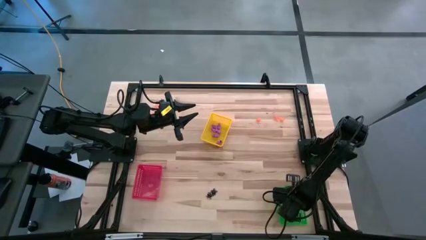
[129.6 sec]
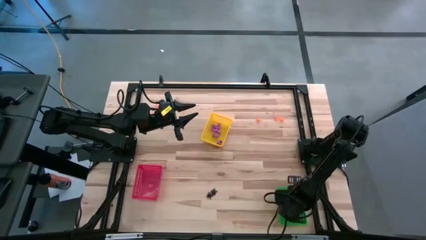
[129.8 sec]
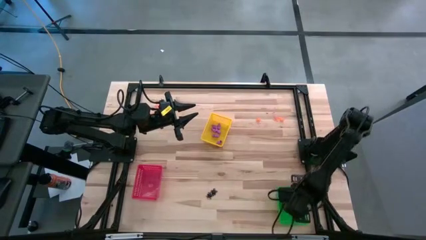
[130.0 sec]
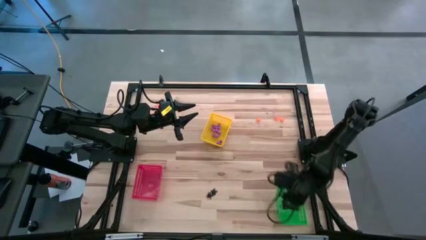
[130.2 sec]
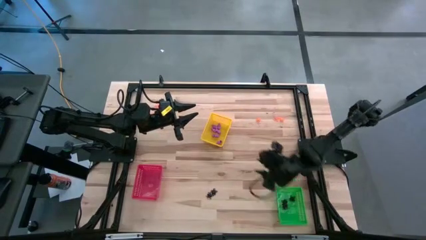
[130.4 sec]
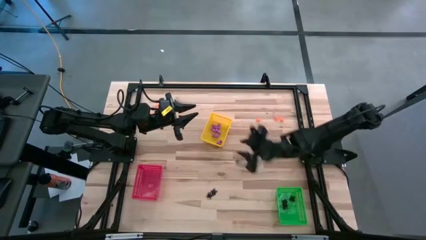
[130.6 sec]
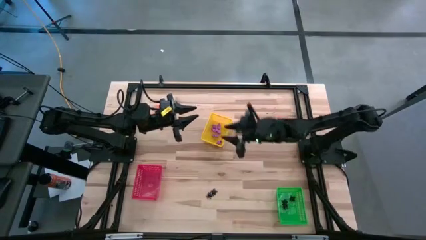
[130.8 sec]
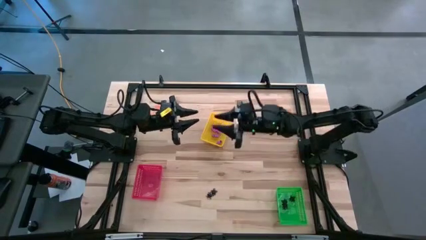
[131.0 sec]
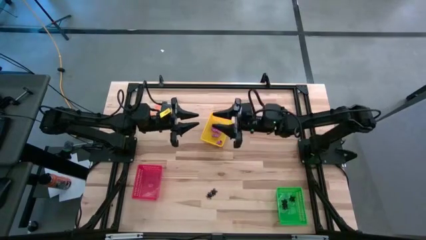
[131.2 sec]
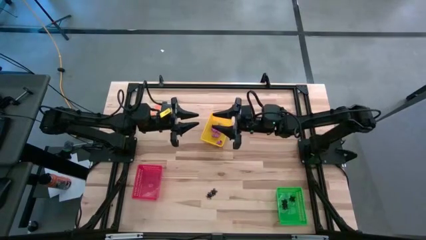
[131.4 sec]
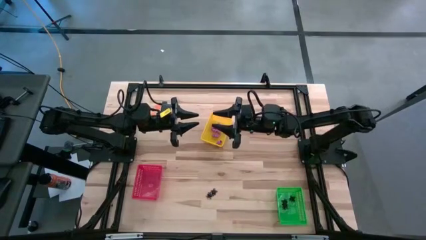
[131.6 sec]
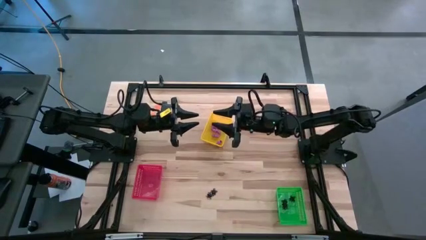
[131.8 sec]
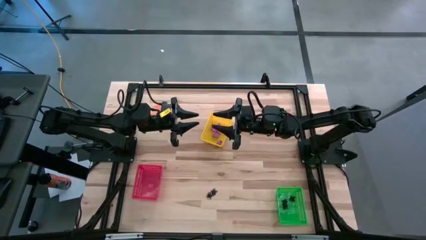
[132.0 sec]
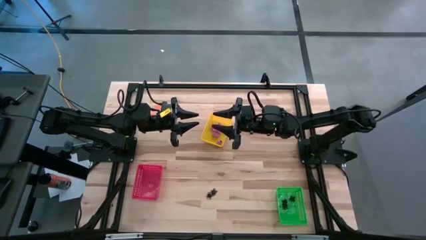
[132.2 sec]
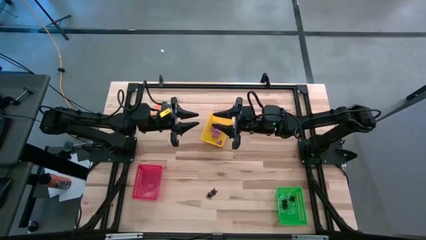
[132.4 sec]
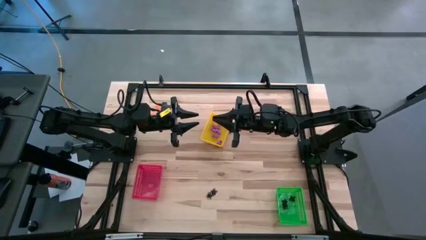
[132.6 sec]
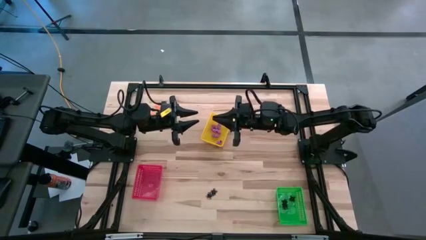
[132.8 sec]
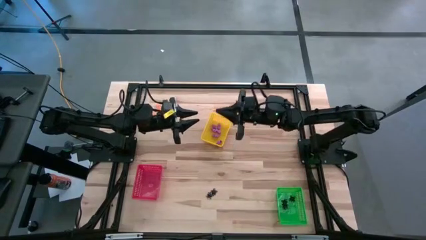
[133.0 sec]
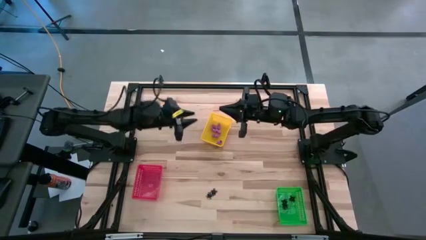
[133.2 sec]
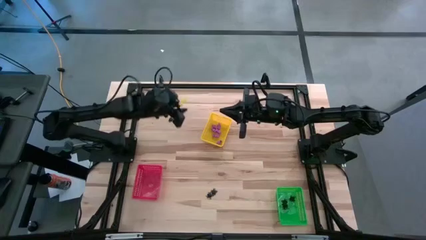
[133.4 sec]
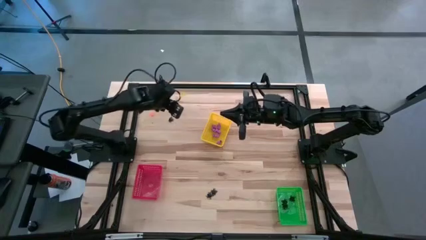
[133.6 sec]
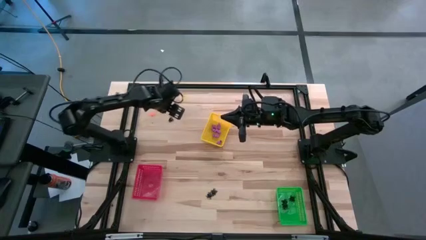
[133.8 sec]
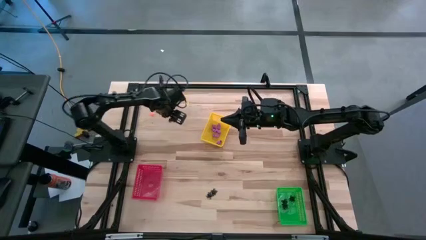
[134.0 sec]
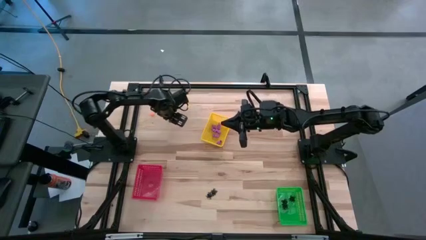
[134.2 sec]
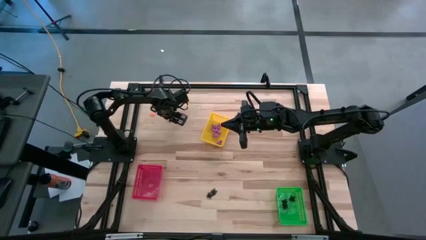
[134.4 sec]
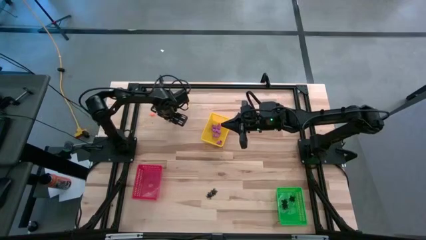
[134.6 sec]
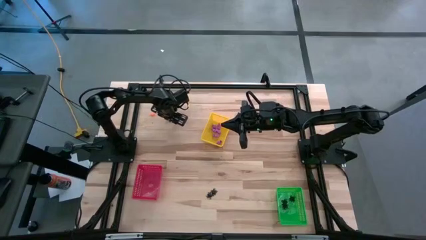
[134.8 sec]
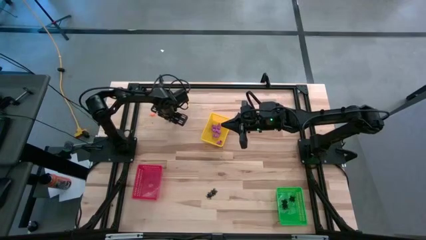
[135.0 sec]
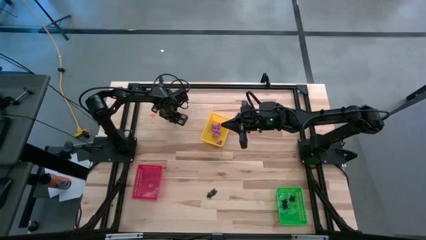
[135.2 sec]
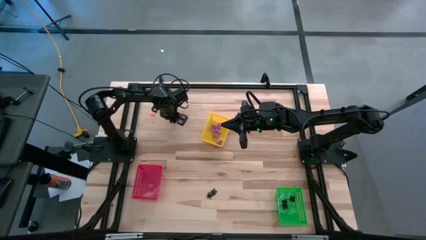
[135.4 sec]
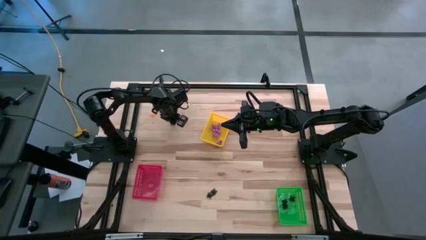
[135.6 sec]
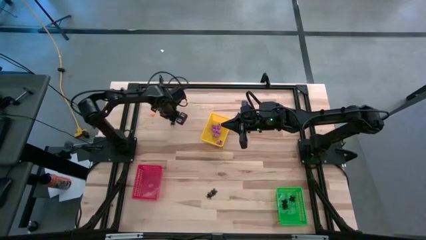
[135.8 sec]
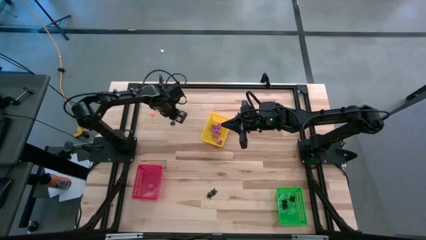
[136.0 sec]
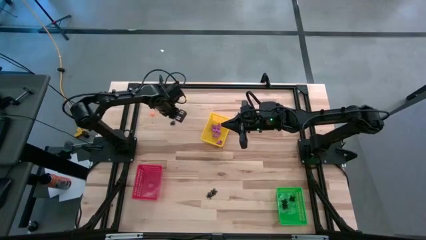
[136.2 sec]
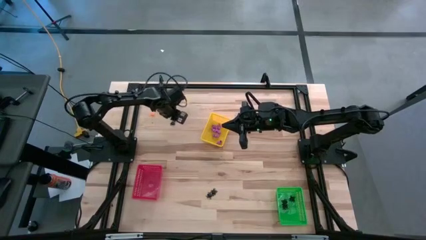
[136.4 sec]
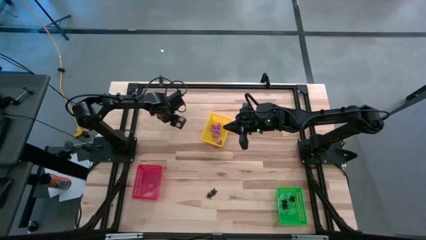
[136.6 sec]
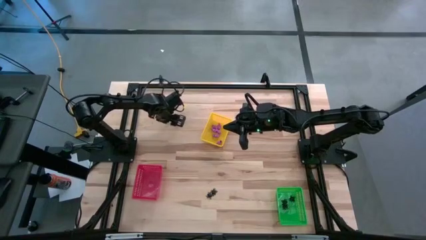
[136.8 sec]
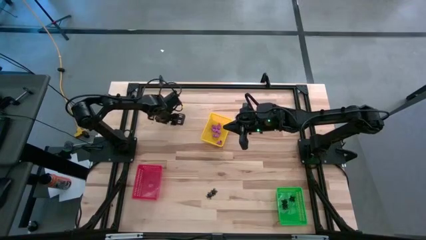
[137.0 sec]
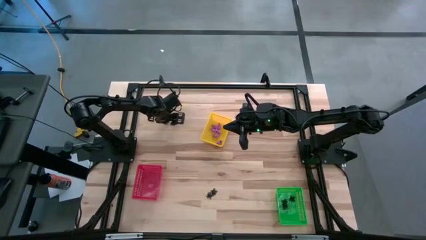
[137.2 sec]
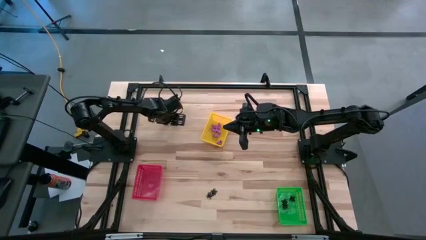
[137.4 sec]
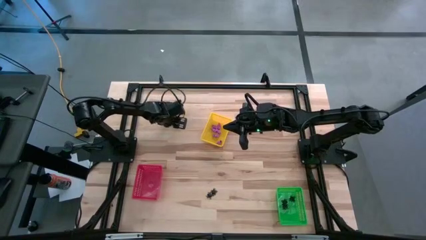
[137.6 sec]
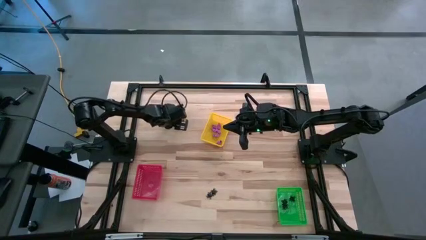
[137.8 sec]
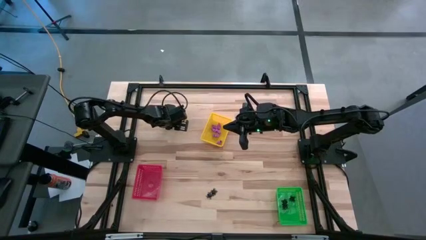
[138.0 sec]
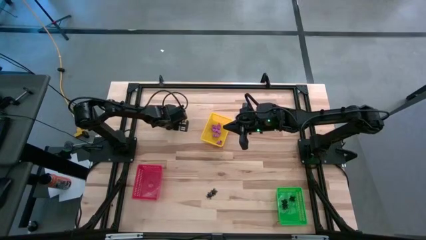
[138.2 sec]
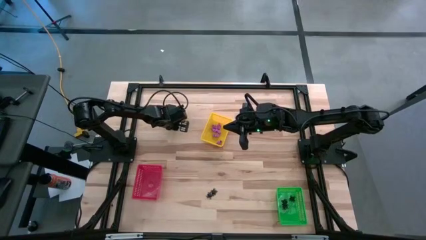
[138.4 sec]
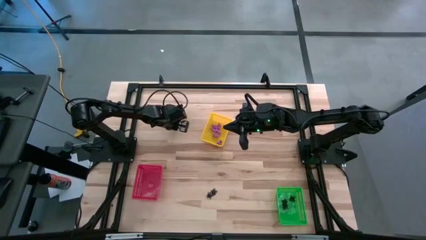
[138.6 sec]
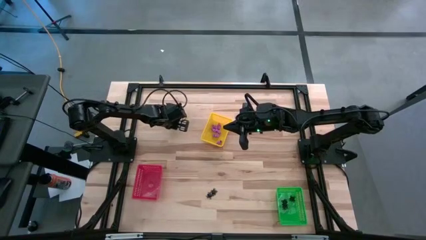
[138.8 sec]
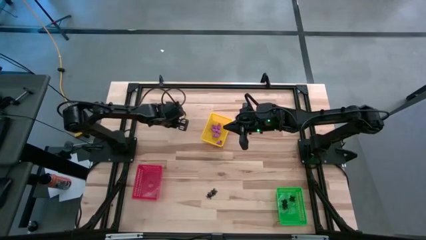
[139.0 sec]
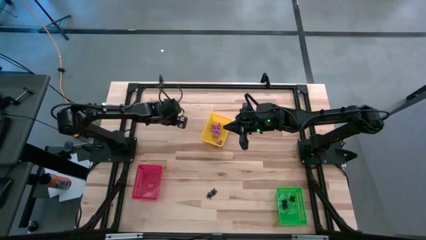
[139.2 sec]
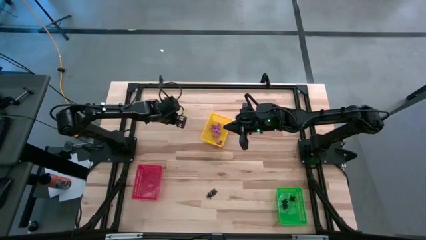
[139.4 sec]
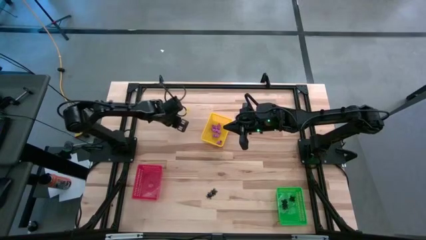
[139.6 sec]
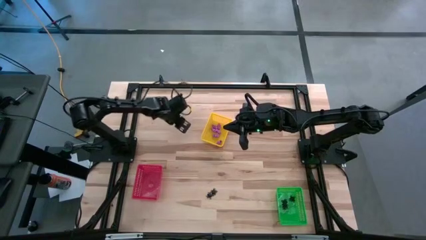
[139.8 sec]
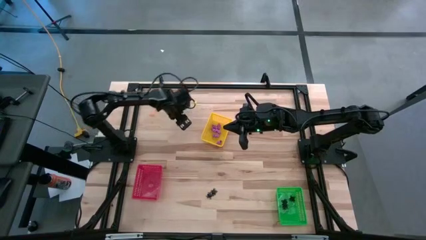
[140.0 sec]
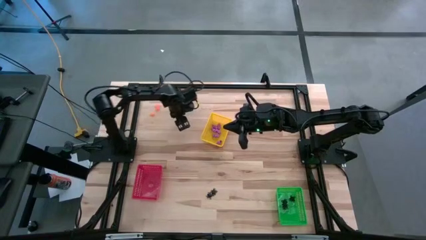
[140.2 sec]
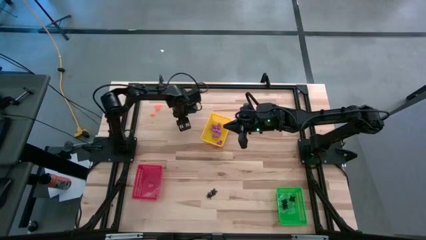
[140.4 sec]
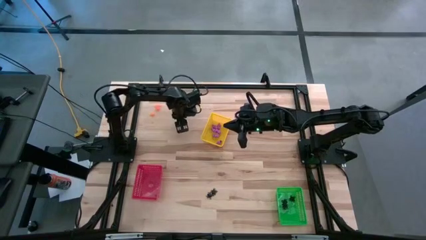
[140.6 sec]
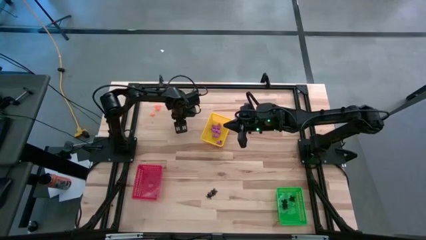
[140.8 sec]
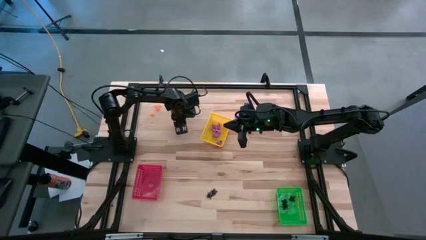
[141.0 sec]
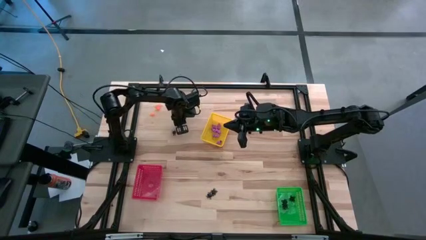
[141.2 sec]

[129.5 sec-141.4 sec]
Task: Sort Halloween decoration
Put the top black spider toy into the green bin
